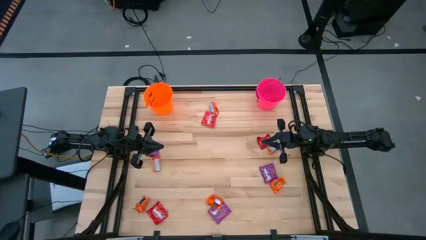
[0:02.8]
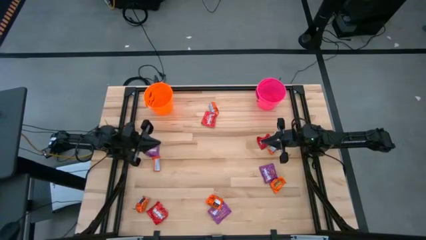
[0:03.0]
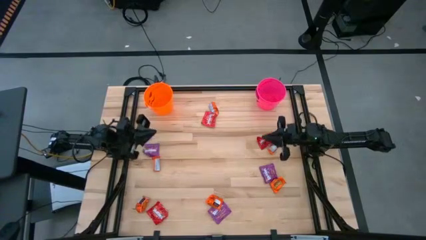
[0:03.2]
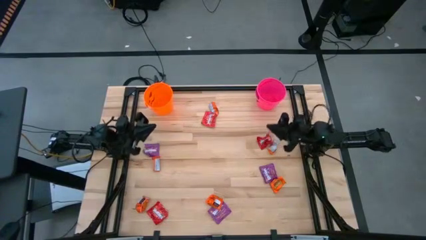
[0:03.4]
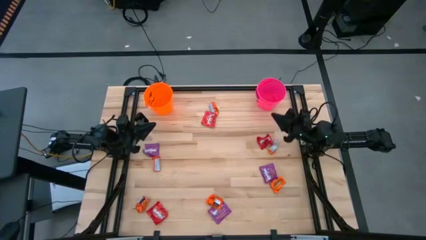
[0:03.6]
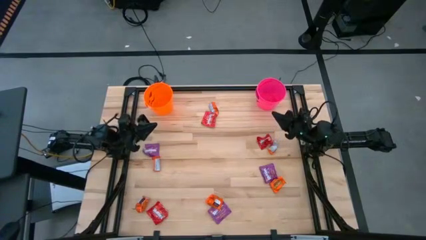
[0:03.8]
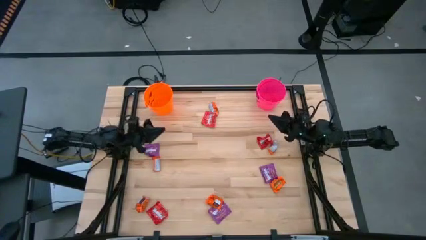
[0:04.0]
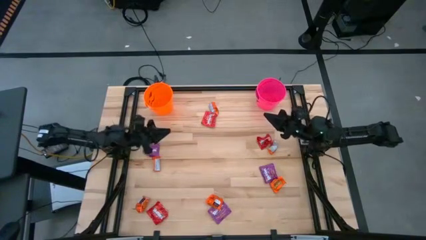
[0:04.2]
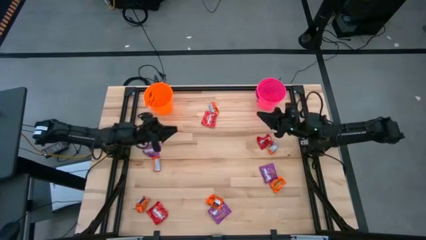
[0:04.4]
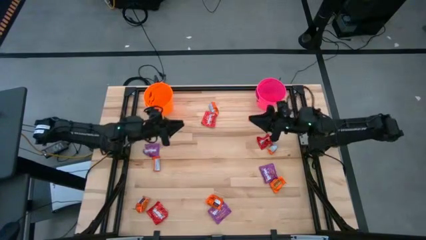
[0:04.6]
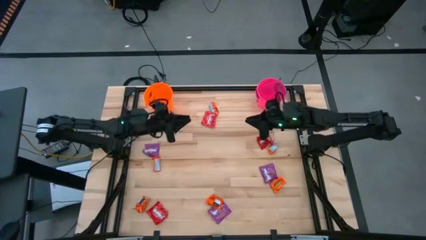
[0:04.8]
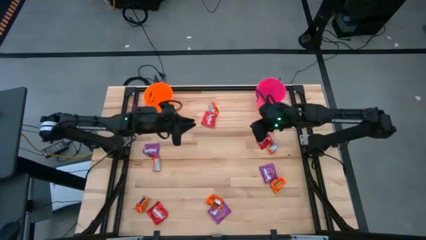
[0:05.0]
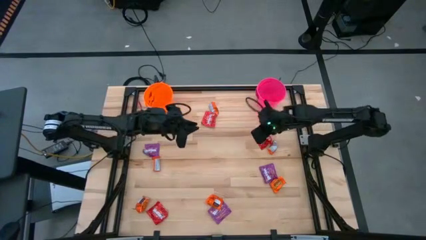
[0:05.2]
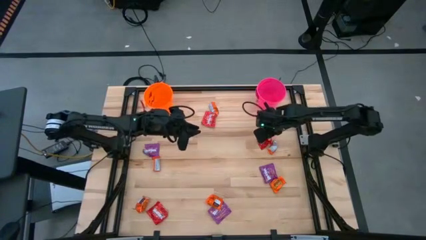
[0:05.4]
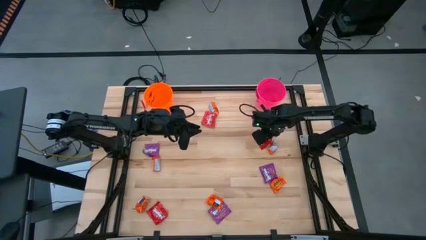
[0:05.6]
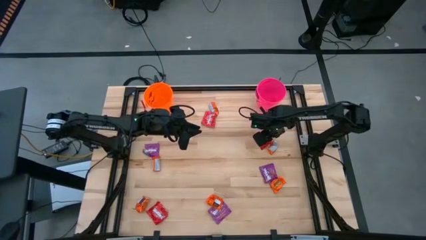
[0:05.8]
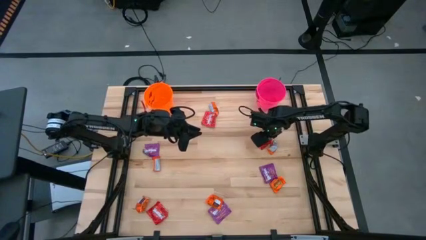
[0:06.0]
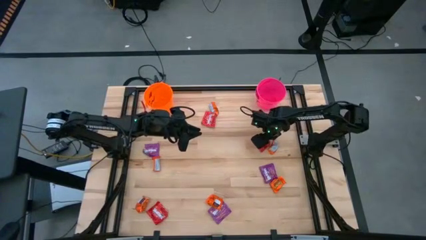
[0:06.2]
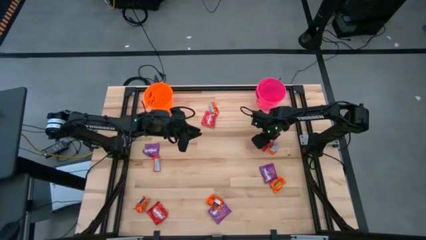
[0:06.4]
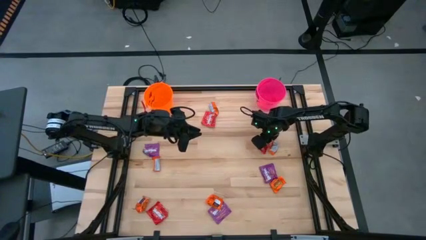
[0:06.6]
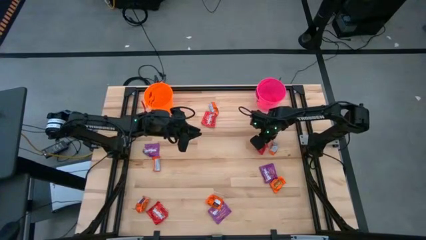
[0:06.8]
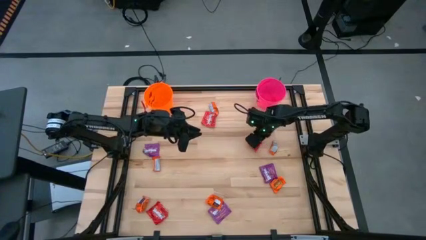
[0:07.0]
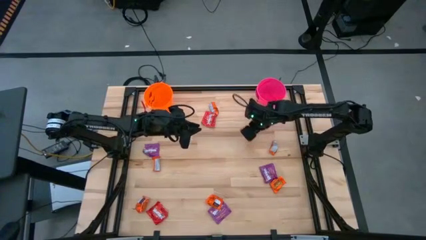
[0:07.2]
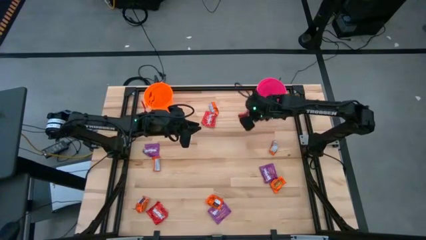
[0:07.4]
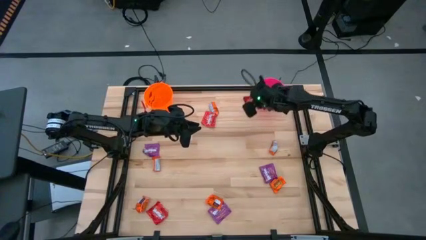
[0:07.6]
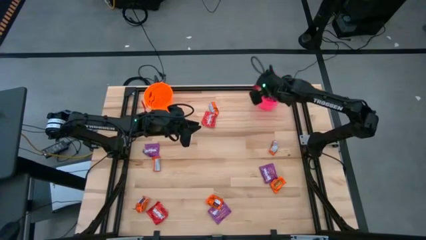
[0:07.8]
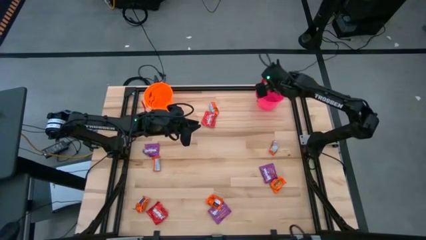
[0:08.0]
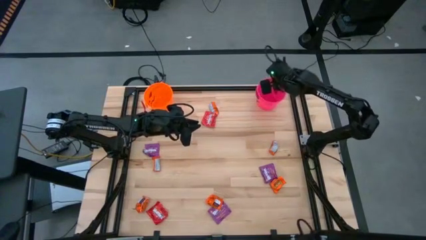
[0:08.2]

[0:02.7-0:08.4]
Task: Sort candy by brand, put in halloween buckets
Put the red candy into the pink bucket

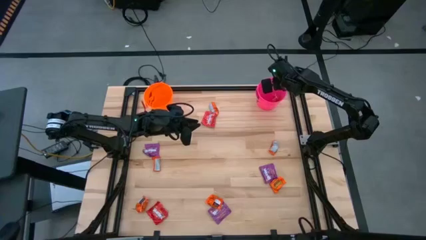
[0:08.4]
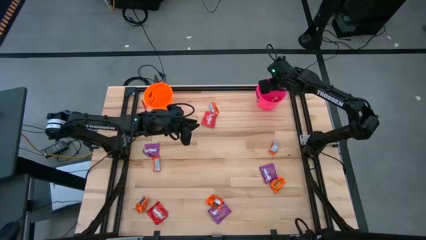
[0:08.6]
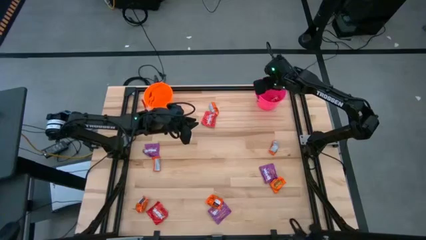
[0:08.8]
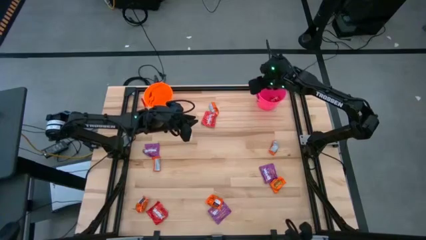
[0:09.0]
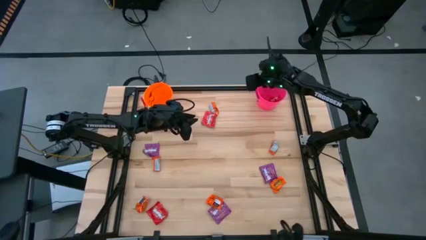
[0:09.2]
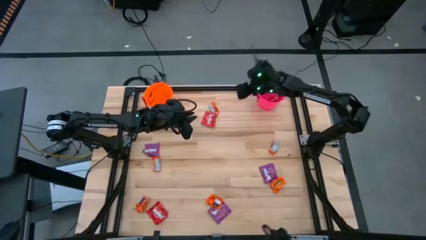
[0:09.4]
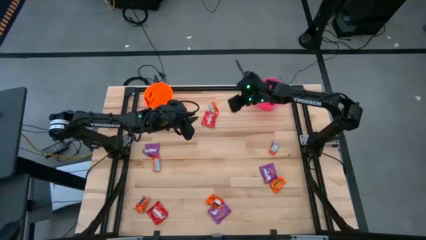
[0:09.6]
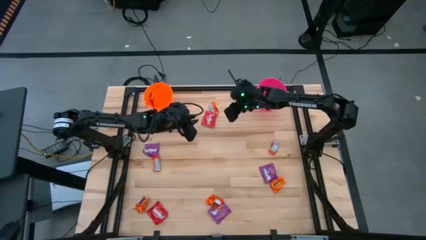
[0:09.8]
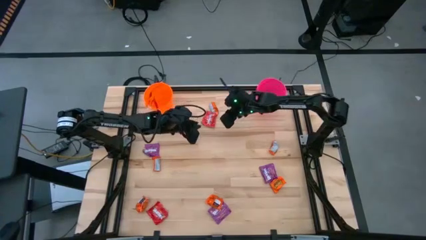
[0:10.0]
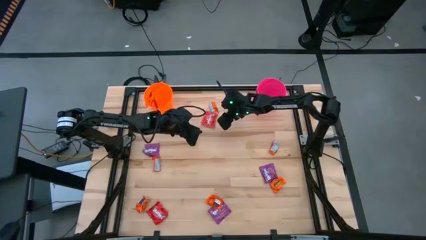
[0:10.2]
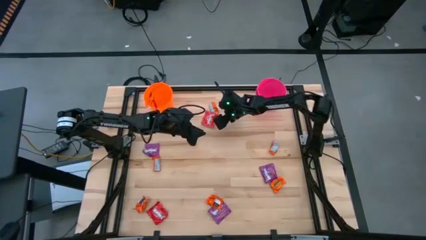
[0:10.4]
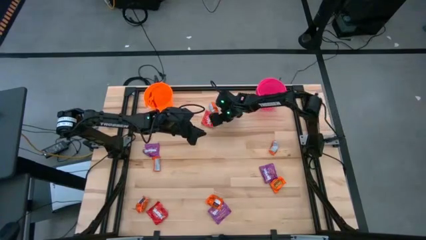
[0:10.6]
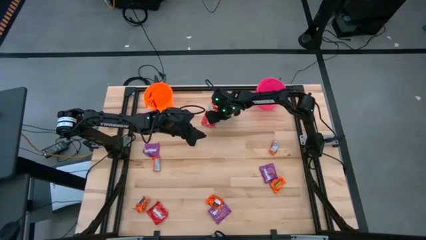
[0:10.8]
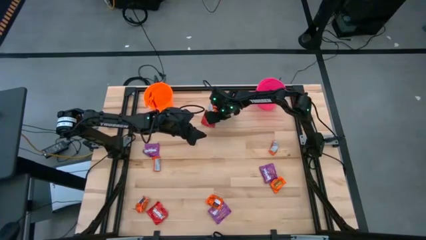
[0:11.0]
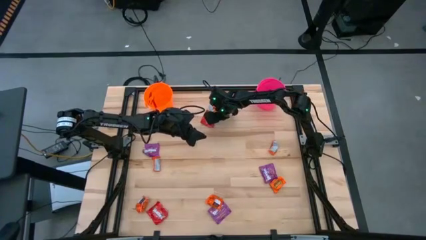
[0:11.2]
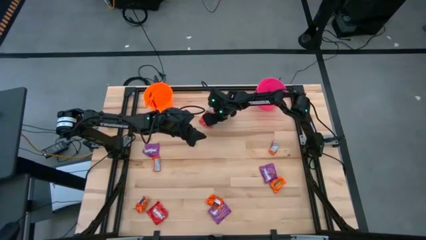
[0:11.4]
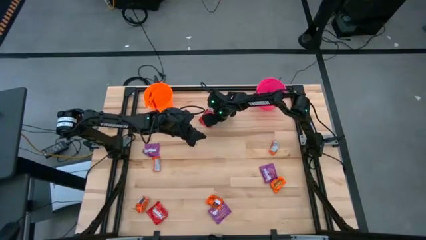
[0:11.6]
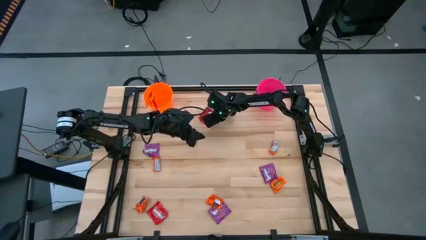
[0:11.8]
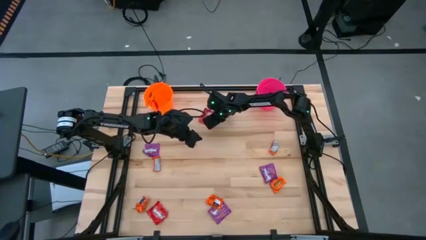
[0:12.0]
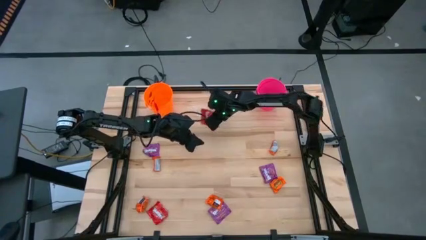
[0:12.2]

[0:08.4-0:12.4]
Put the red candy into the pink bucket

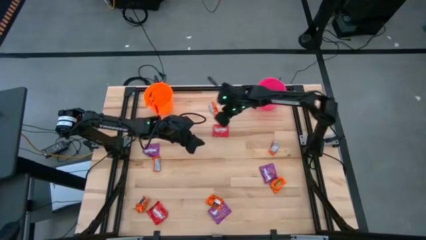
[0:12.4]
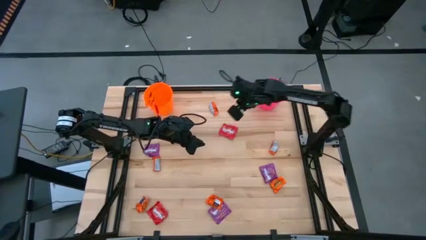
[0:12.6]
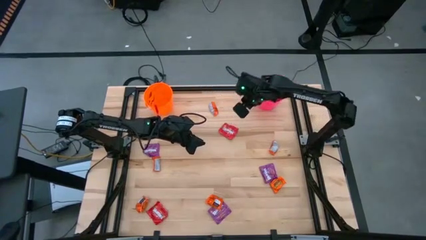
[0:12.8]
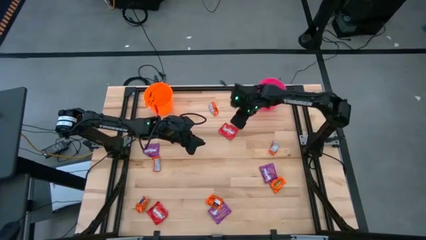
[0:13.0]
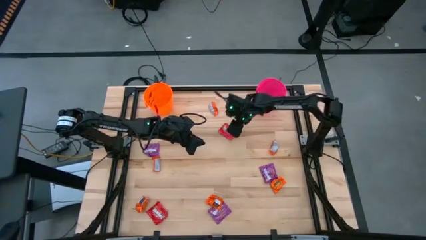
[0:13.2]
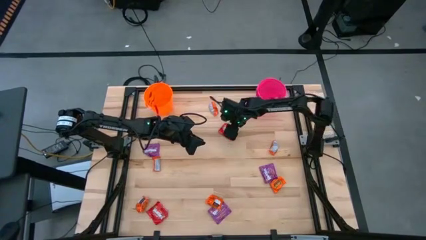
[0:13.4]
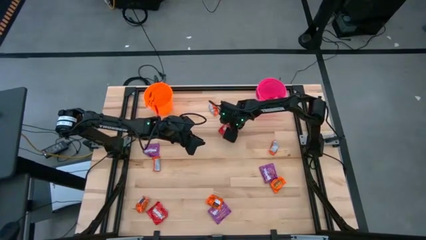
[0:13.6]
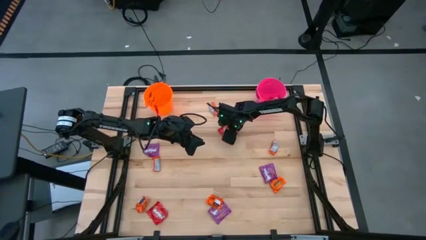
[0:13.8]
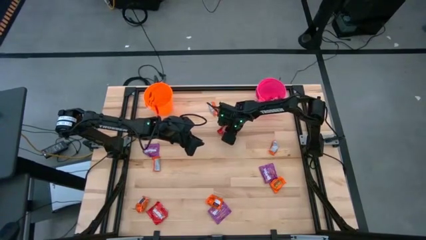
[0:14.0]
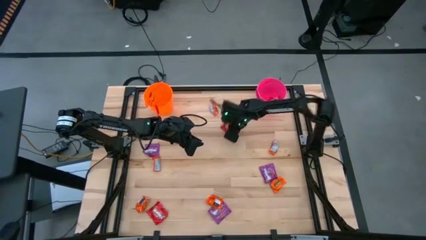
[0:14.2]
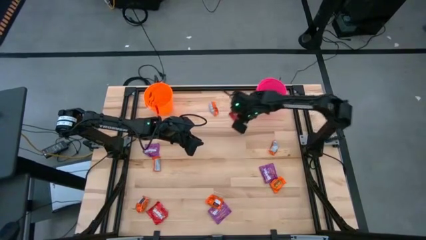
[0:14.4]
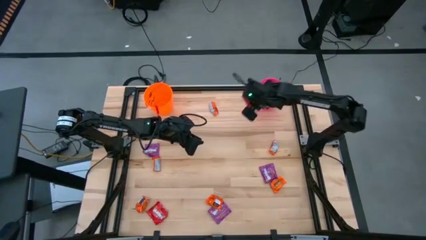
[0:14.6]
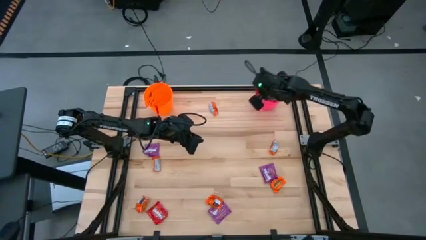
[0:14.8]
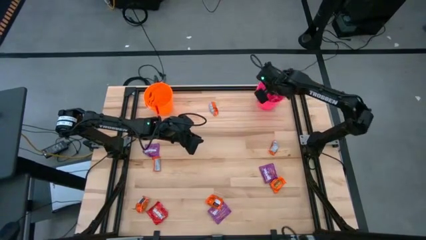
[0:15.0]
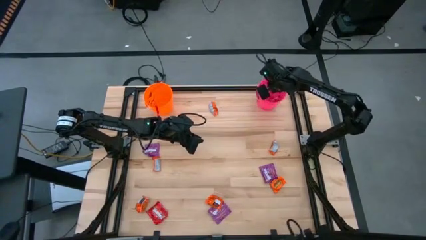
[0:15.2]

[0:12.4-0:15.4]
Put the red candy into the pink bucket

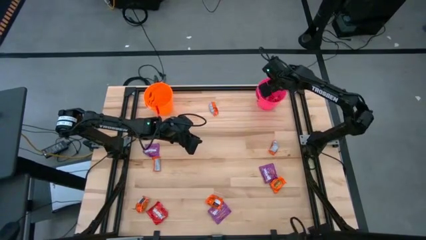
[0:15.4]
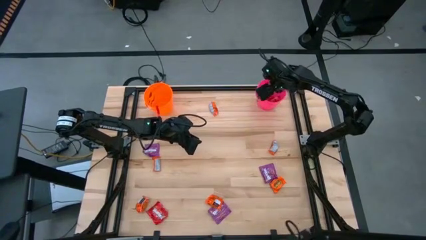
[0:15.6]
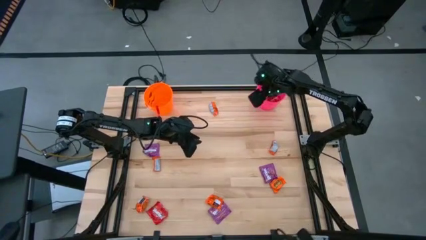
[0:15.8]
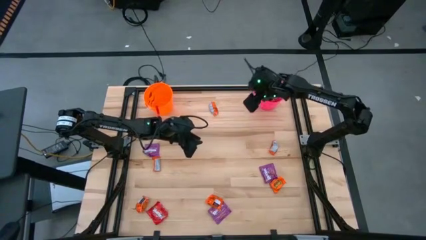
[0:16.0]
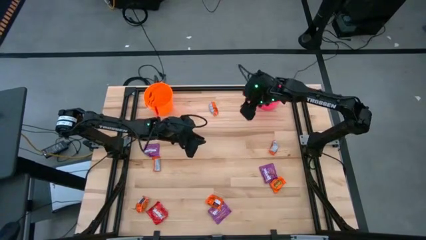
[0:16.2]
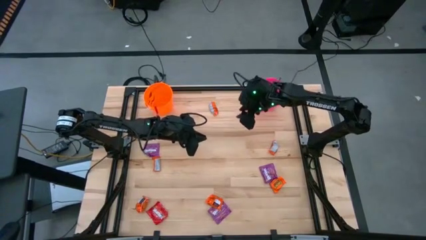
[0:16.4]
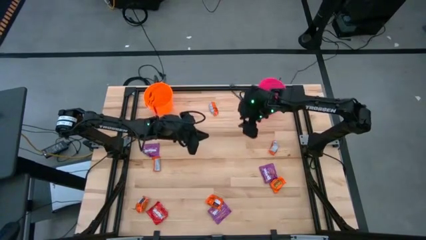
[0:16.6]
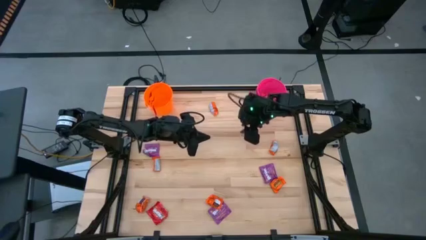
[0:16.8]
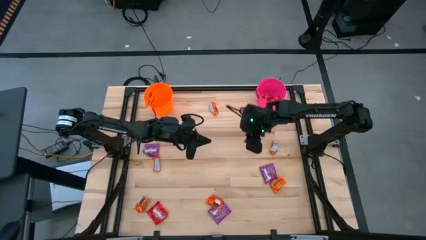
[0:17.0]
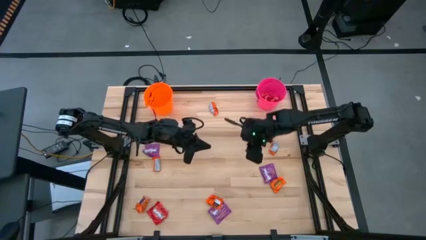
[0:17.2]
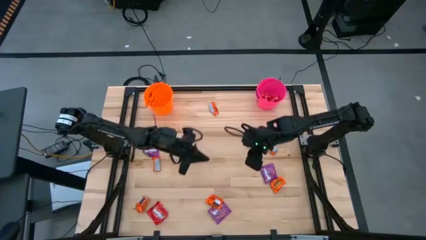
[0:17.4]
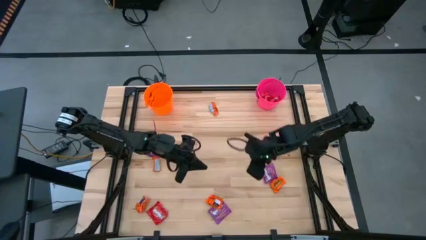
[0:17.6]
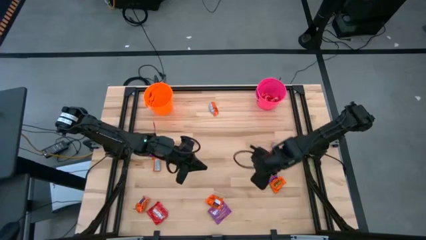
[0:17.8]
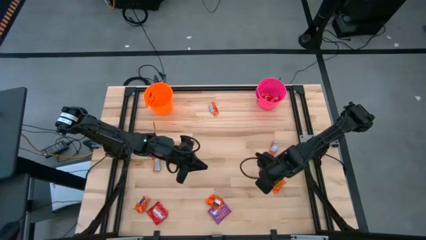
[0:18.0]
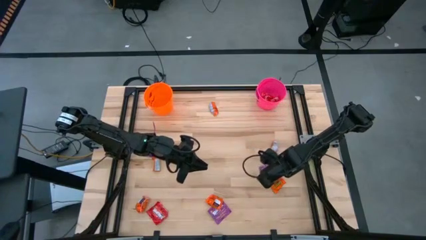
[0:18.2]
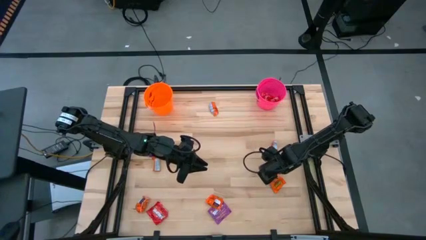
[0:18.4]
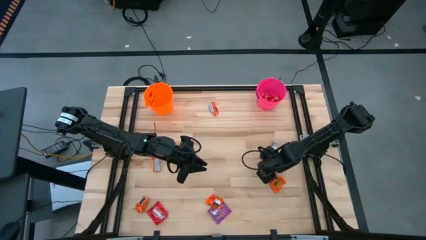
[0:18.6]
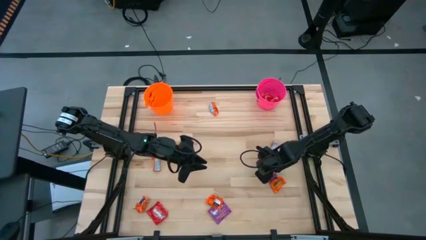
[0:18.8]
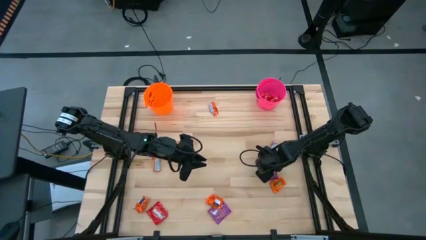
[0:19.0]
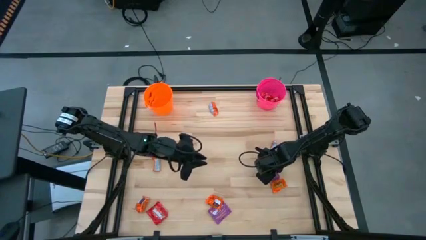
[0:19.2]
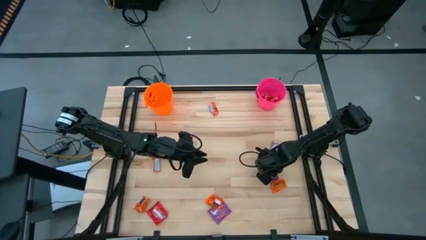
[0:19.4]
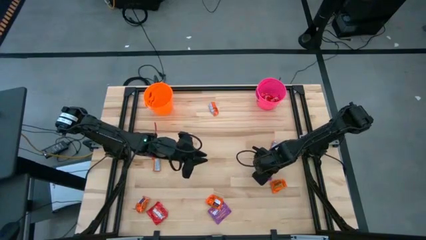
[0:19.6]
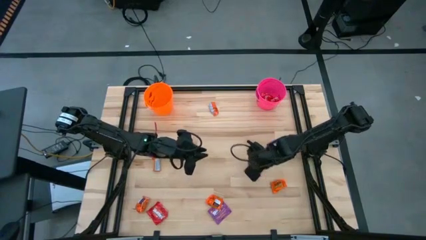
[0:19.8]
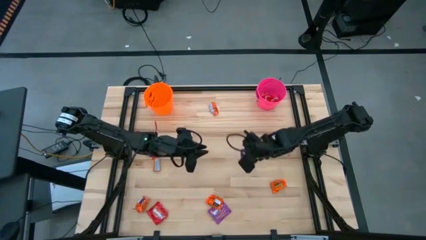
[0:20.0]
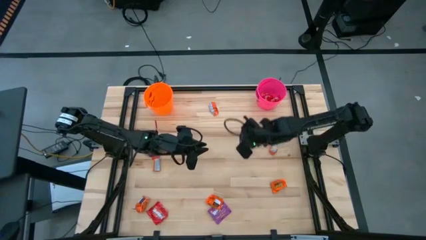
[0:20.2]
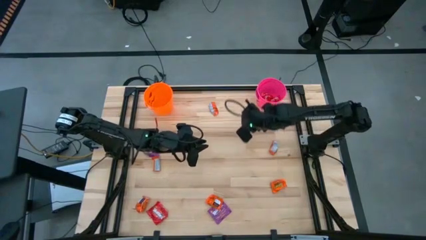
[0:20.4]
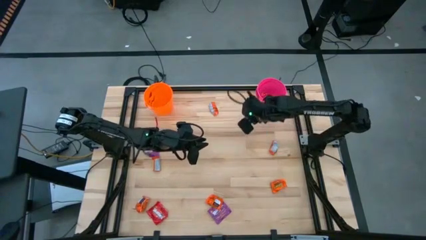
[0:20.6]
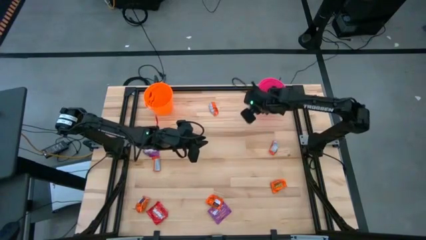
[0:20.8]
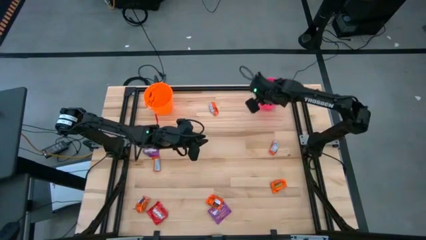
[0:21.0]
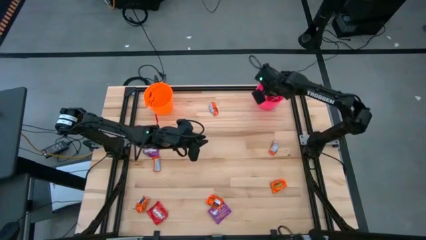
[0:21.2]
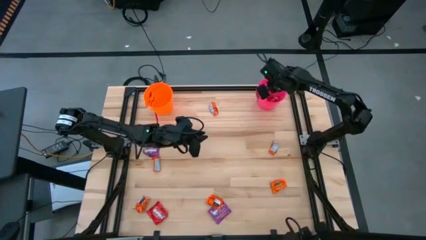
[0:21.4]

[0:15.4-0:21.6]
Put the purple candy into the pink bucket
